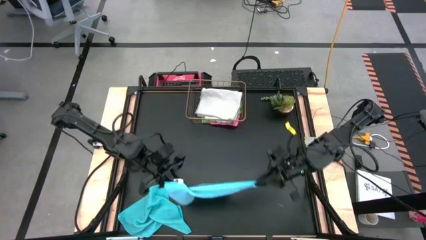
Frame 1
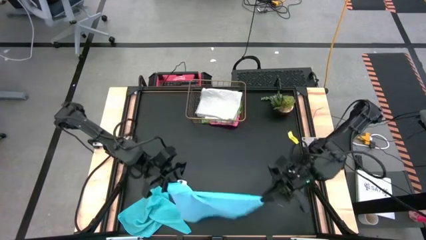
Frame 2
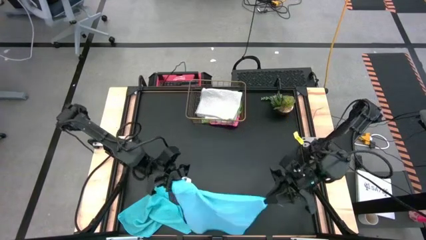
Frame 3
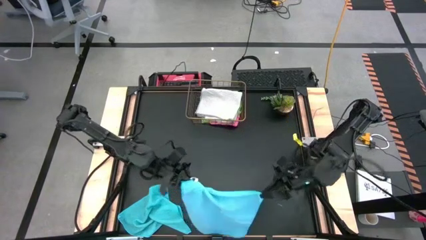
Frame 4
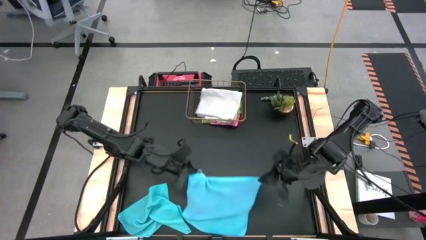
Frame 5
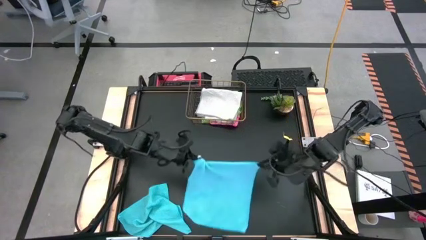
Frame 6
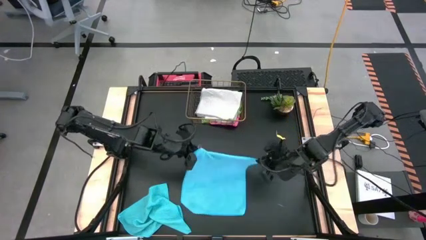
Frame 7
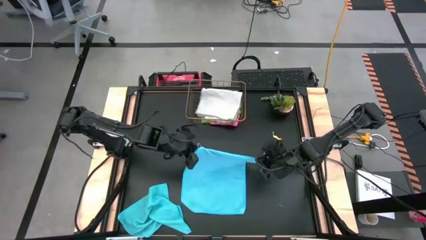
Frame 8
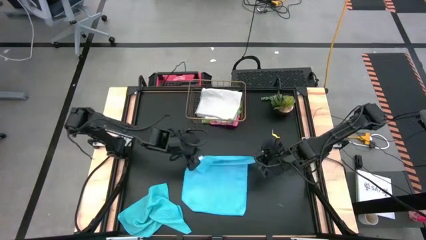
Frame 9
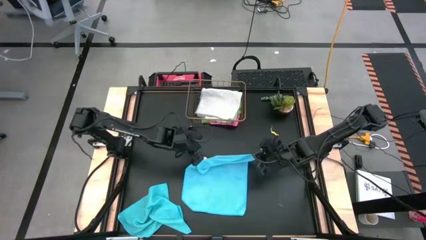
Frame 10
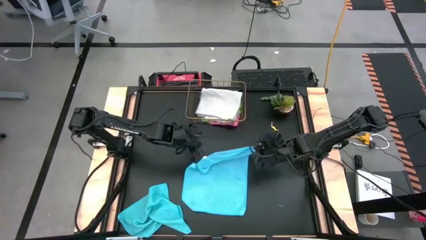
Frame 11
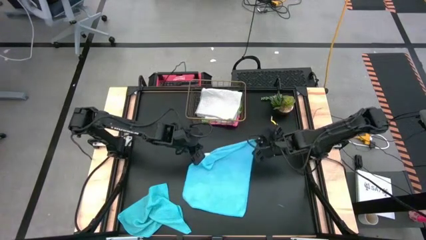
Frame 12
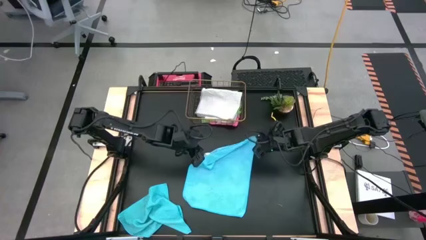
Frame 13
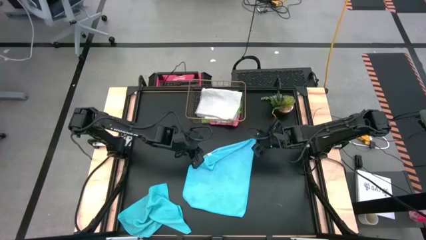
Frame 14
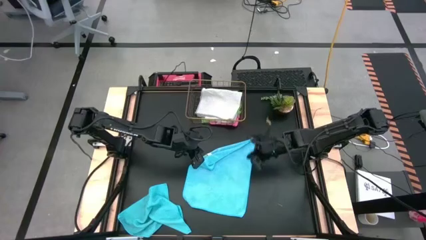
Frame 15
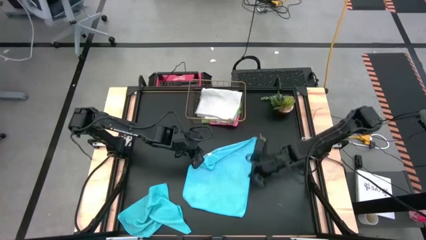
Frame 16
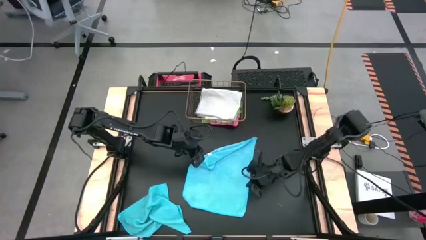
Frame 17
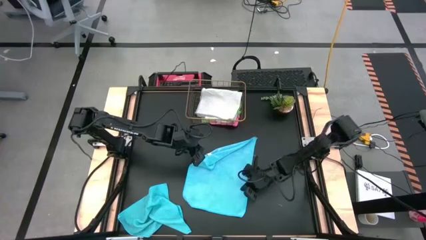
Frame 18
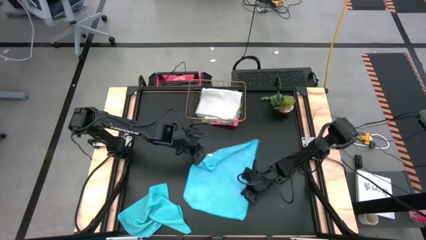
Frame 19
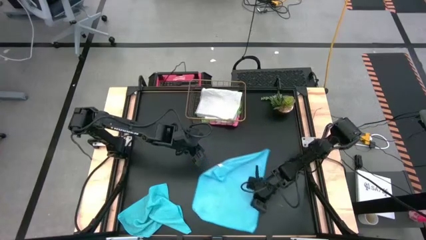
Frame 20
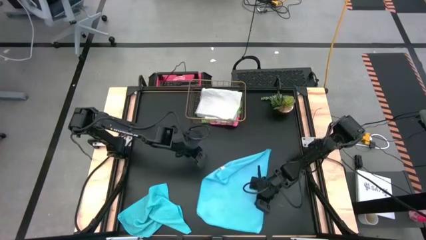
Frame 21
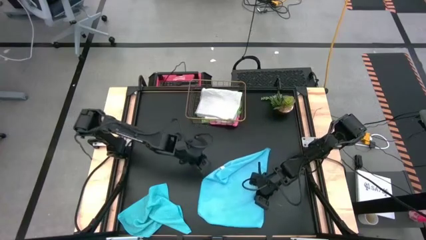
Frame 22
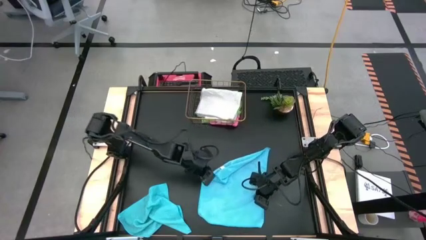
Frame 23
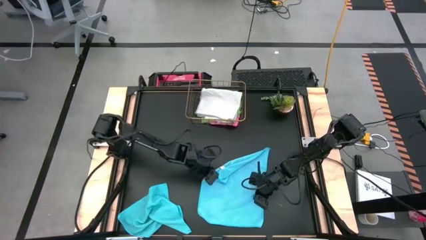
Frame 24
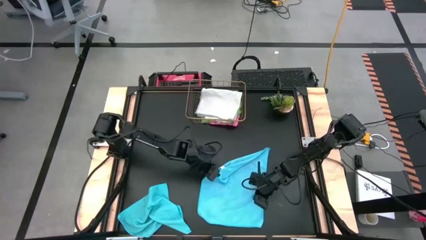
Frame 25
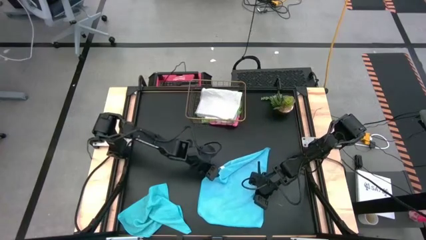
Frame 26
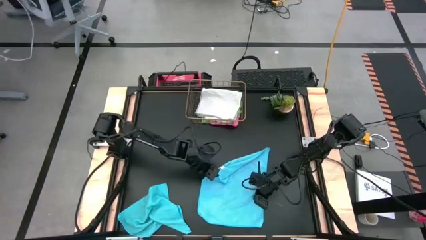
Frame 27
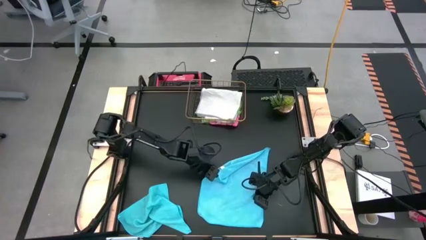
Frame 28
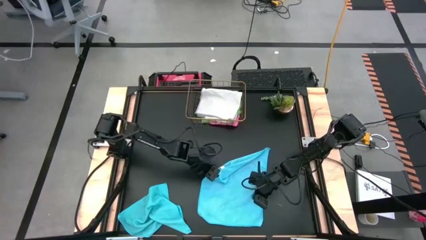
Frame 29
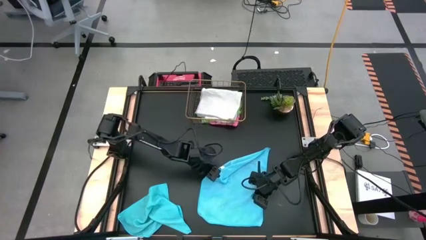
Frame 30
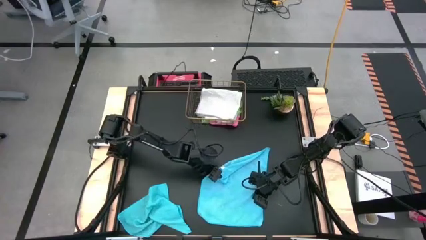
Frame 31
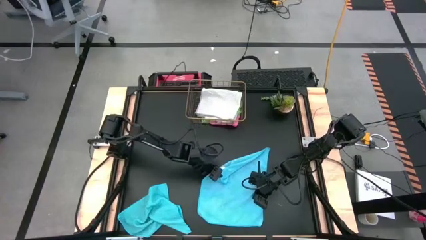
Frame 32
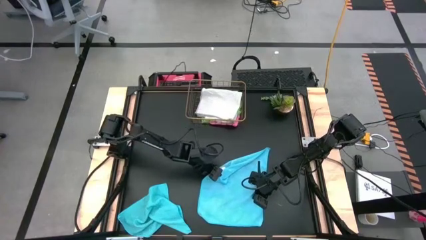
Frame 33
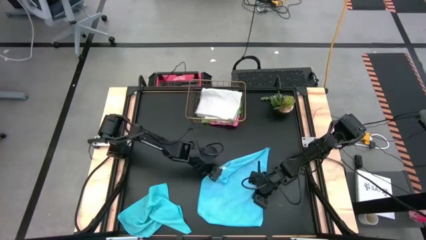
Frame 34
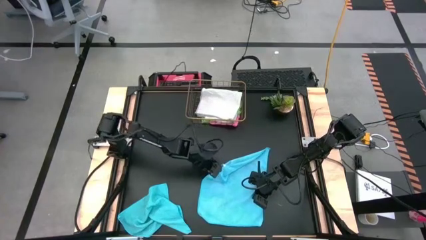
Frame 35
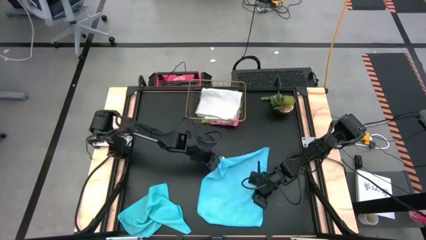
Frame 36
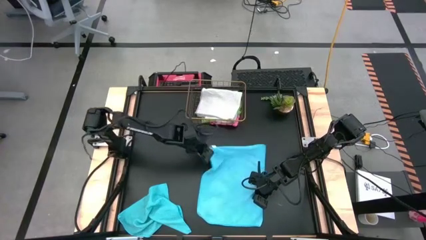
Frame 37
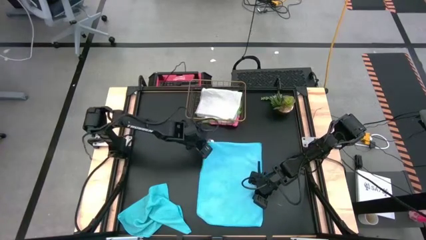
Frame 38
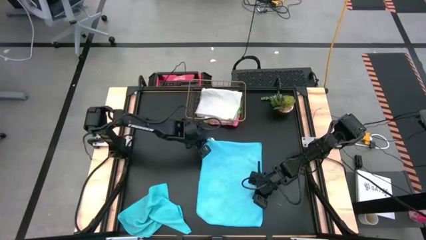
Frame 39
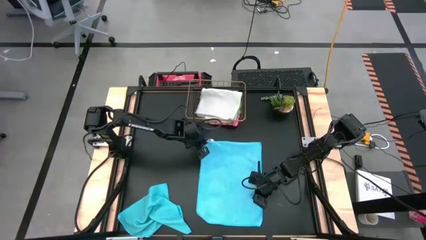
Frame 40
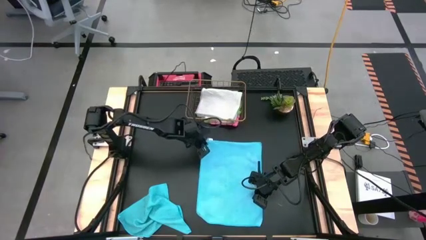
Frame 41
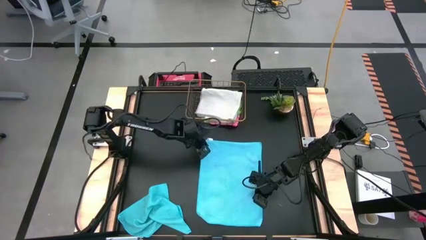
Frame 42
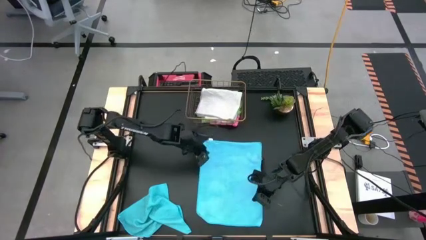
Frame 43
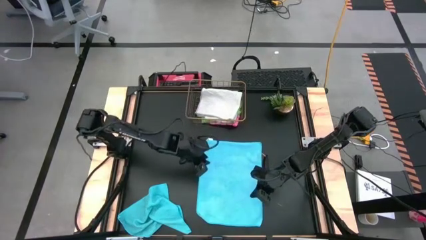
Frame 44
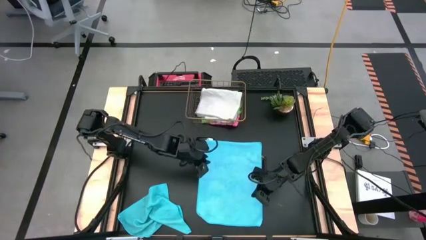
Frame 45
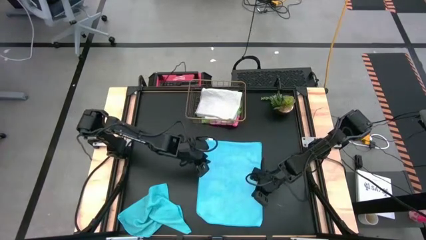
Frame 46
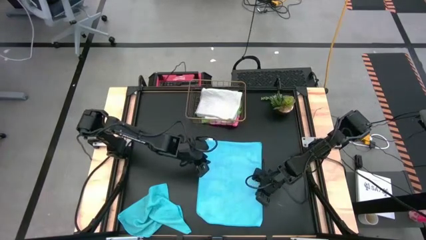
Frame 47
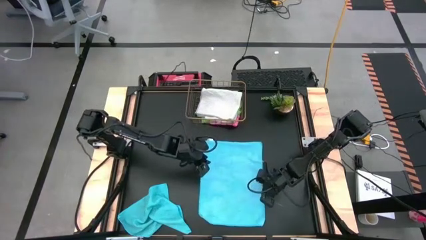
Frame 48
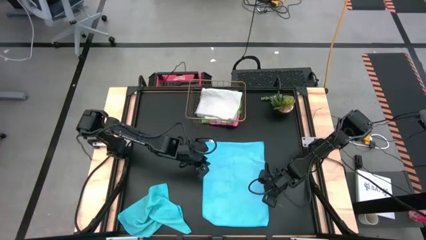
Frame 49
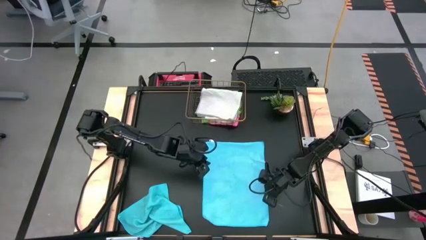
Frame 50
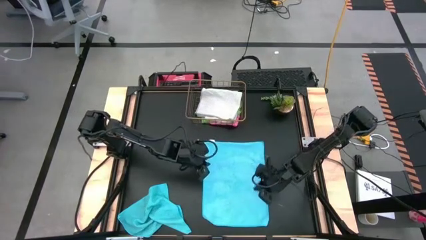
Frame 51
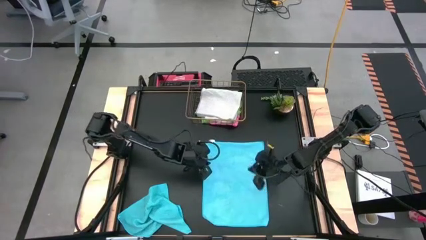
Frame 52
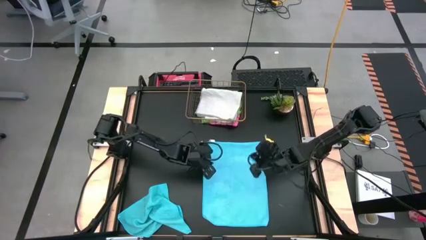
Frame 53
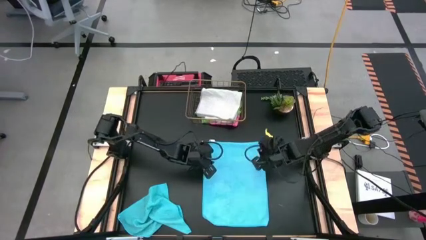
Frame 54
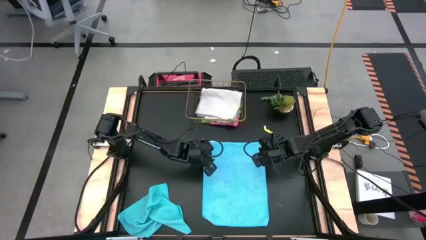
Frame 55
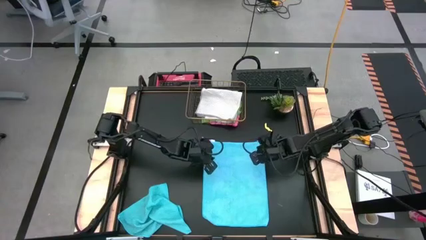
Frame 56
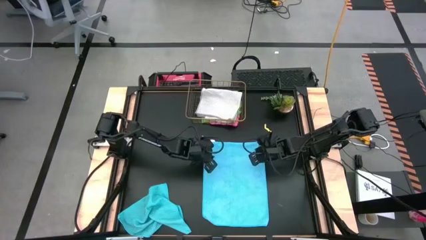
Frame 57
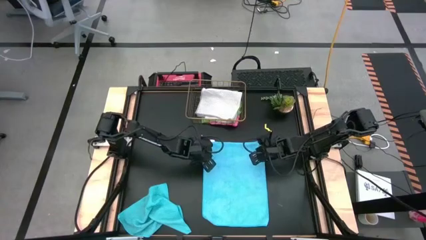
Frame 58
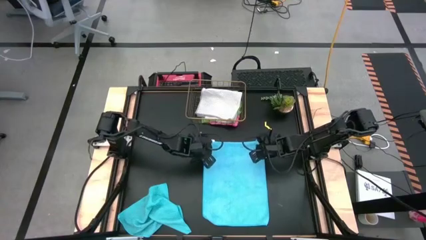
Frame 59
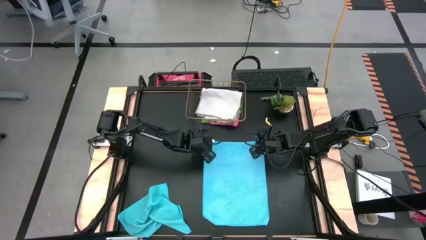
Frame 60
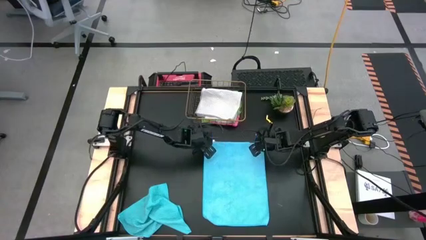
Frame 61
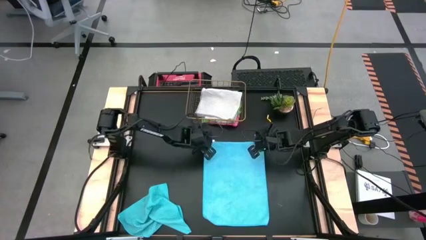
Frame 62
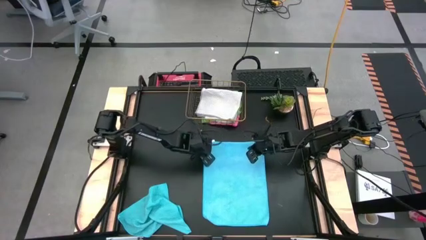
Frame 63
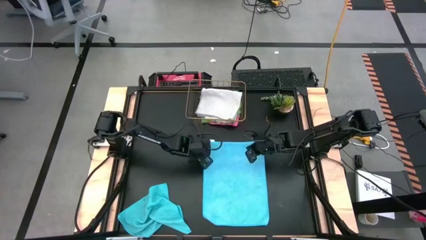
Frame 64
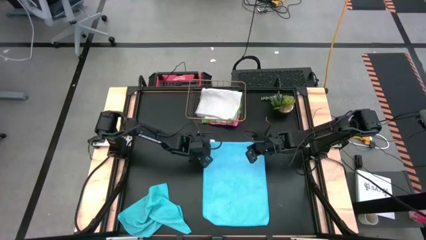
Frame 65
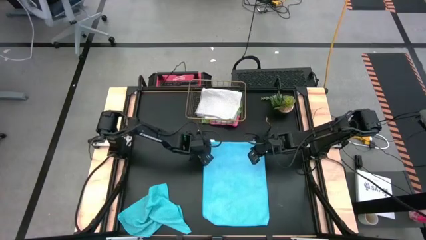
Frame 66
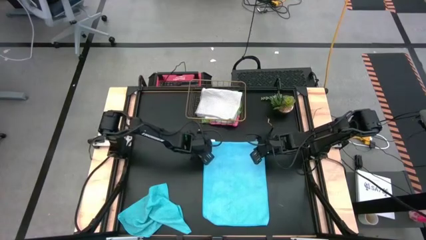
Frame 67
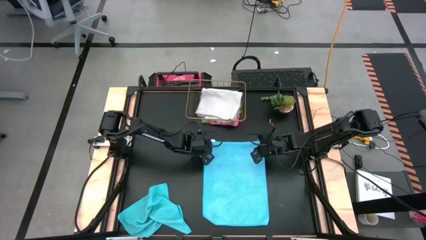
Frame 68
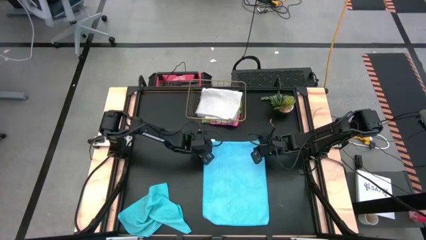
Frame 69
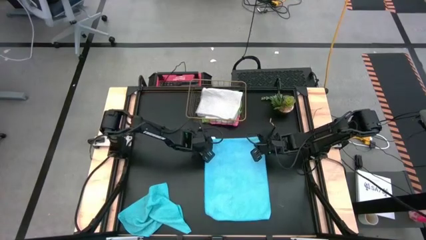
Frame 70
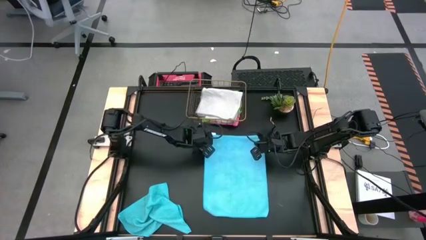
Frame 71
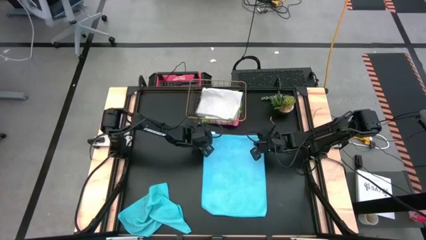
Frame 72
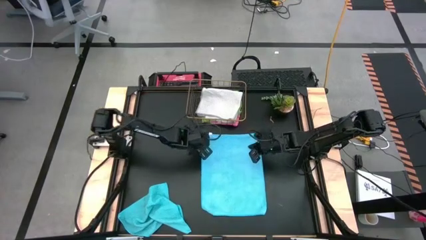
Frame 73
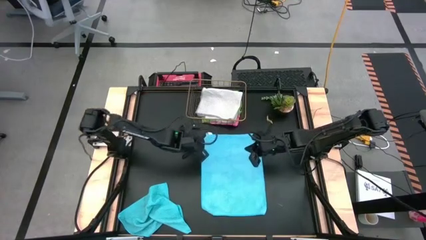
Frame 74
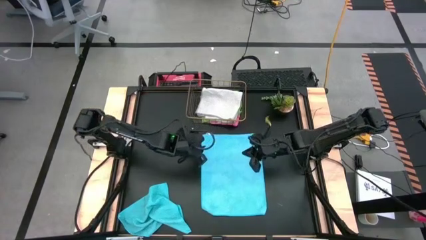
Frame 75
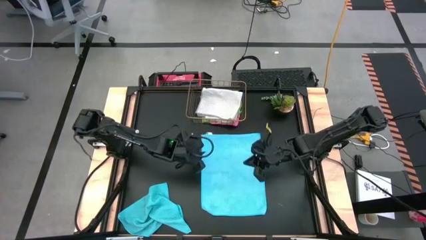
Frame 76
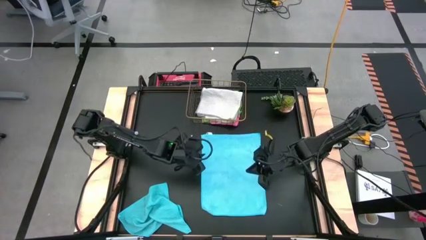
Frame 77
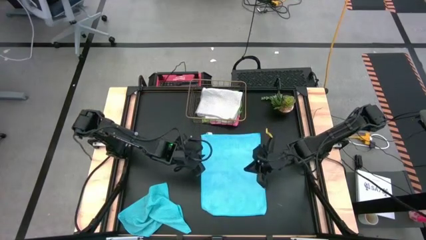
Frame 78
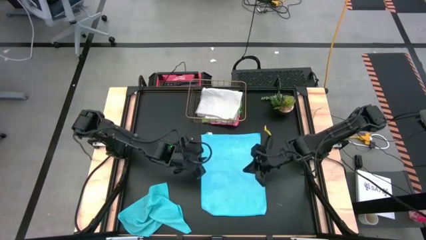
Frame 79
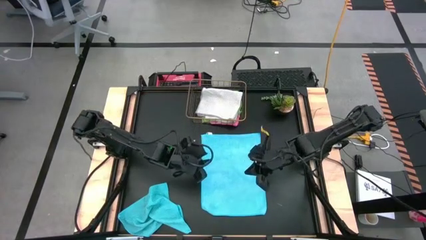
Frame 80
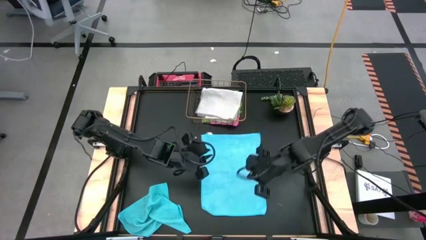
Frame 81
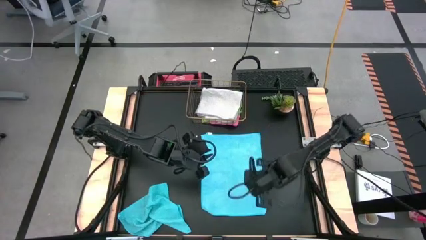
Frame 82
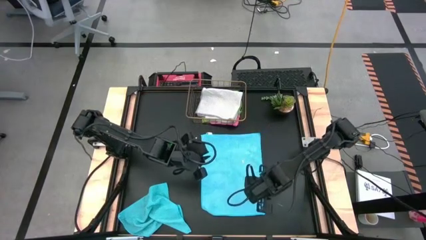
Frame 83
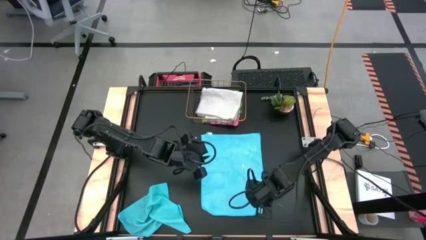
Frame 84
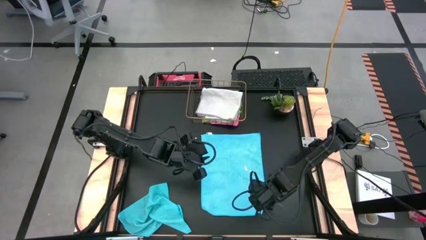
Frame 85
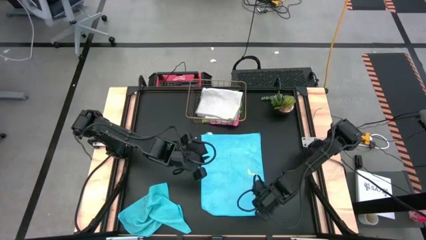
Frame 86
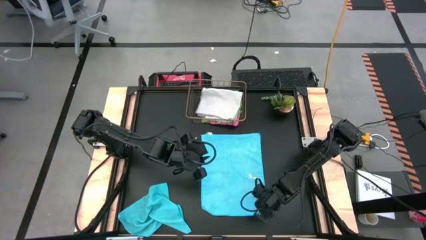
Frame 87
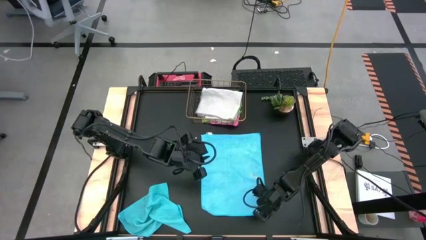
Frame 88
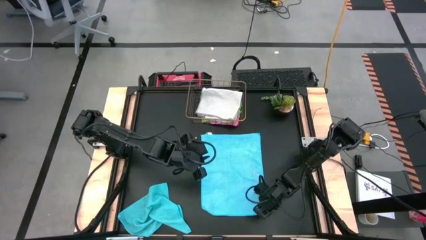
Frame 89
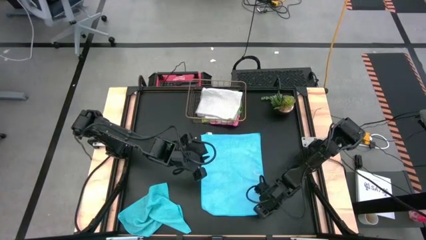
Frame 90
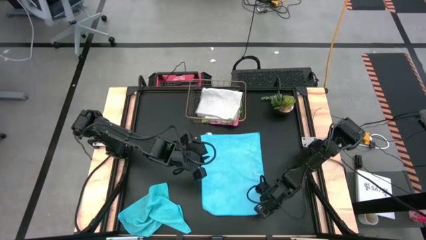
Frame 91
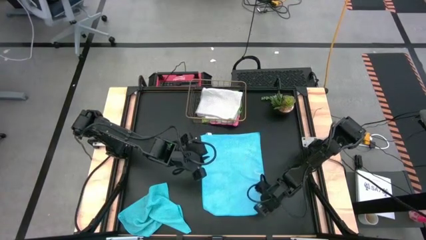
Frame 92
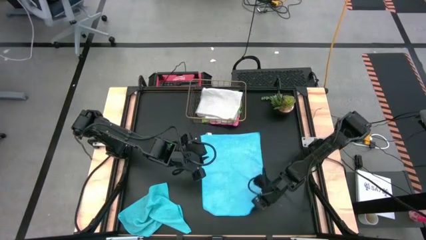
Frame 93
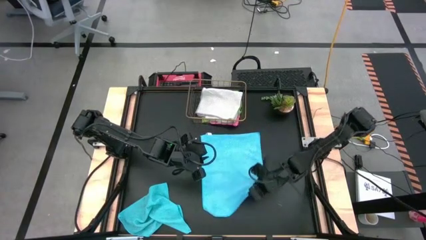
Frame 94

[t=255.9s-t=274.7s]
Task: Fold microfiber towels
Fold the right light blue microfiber cloth in half
